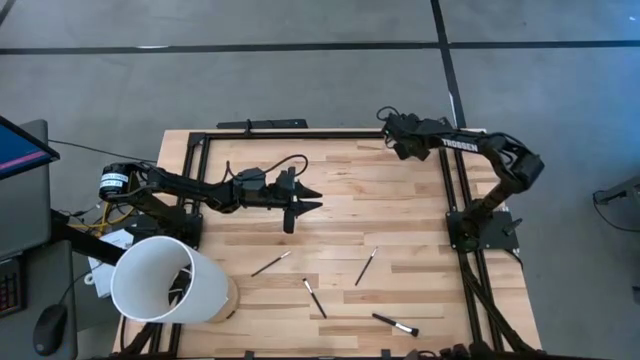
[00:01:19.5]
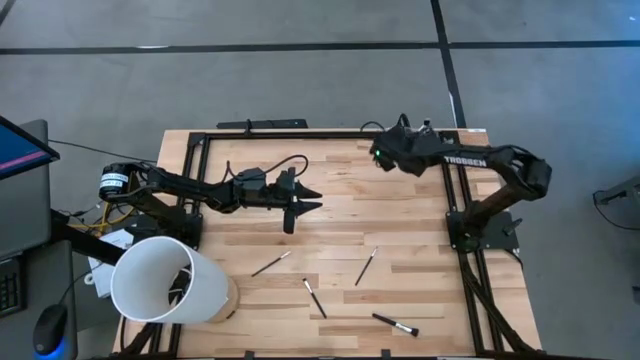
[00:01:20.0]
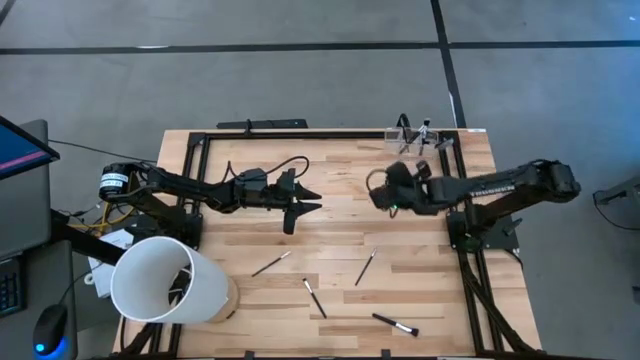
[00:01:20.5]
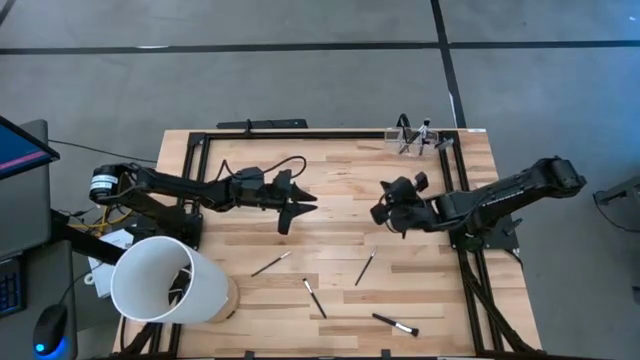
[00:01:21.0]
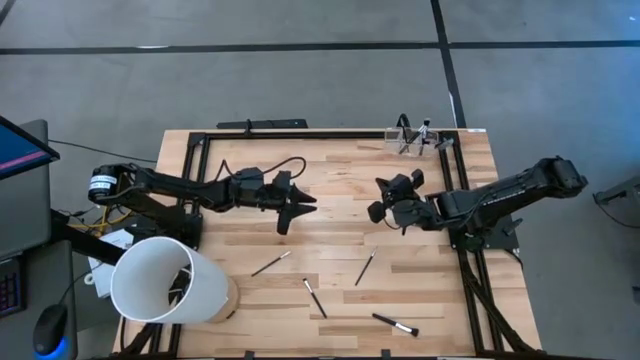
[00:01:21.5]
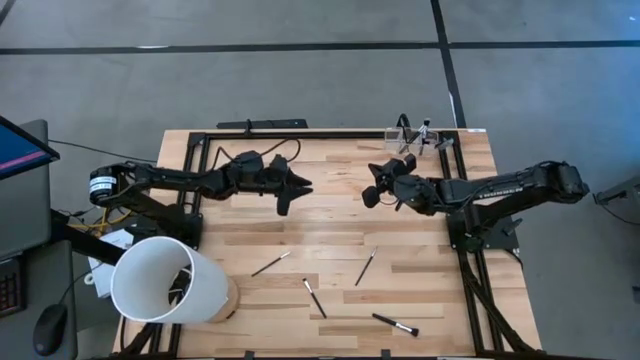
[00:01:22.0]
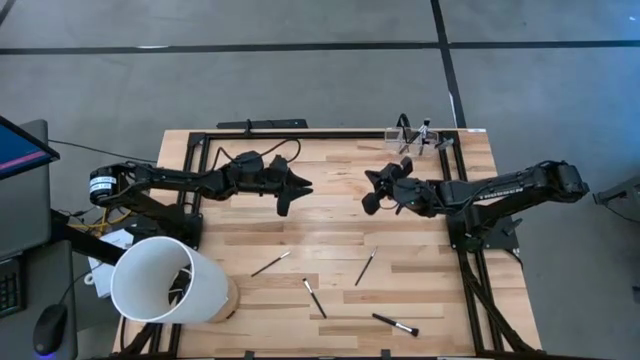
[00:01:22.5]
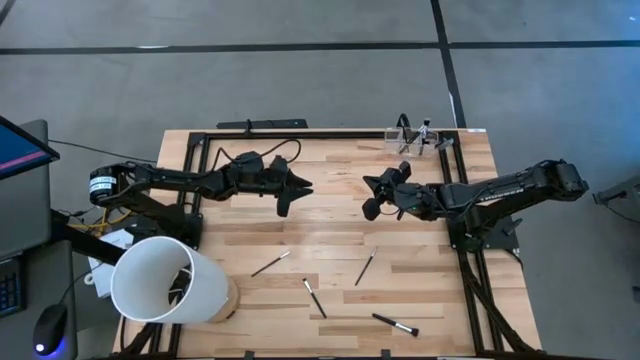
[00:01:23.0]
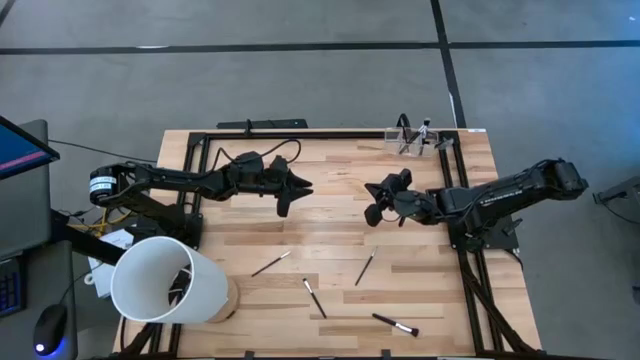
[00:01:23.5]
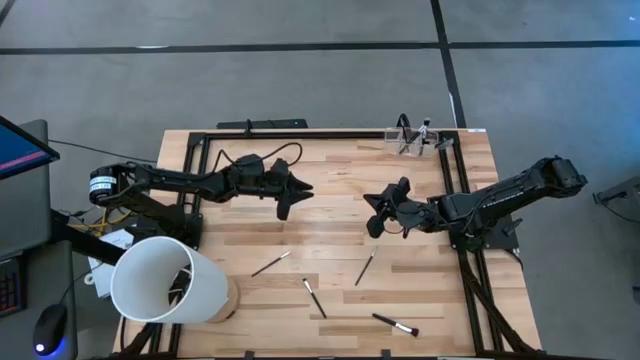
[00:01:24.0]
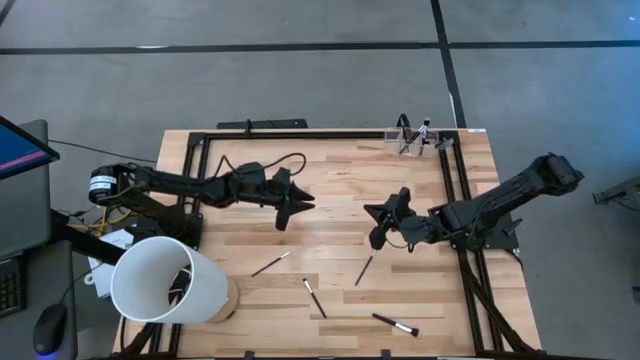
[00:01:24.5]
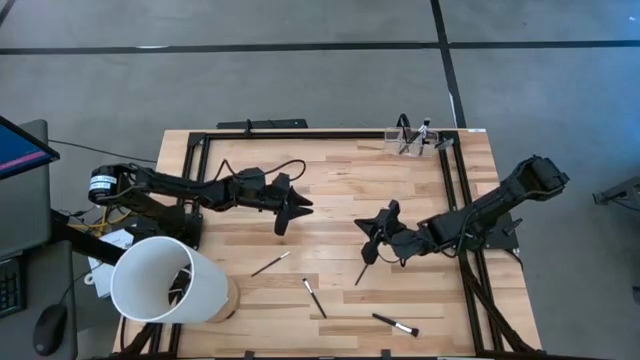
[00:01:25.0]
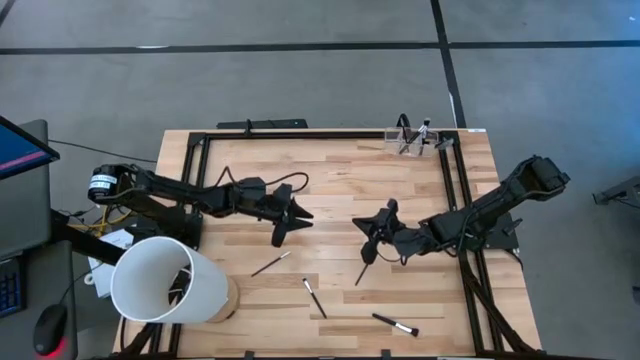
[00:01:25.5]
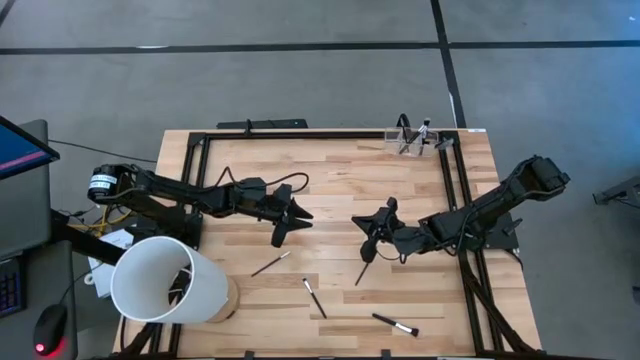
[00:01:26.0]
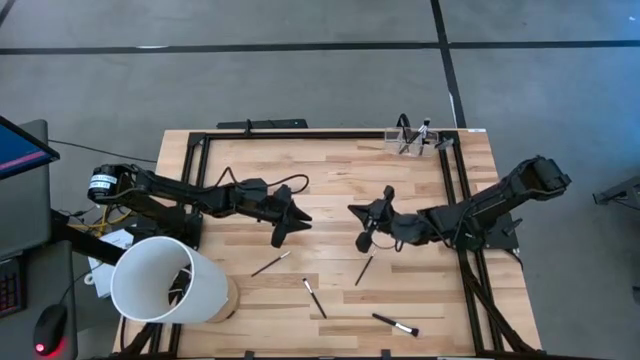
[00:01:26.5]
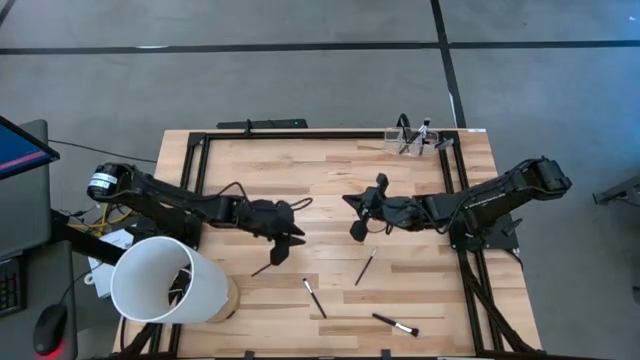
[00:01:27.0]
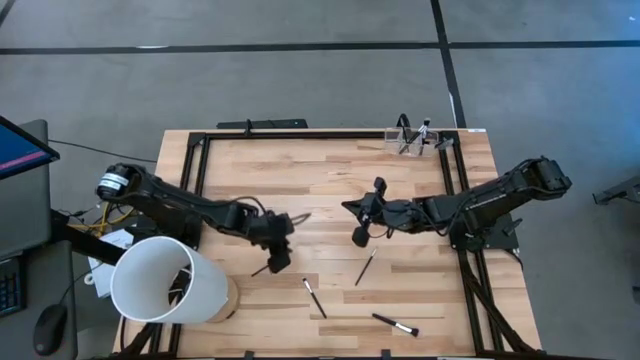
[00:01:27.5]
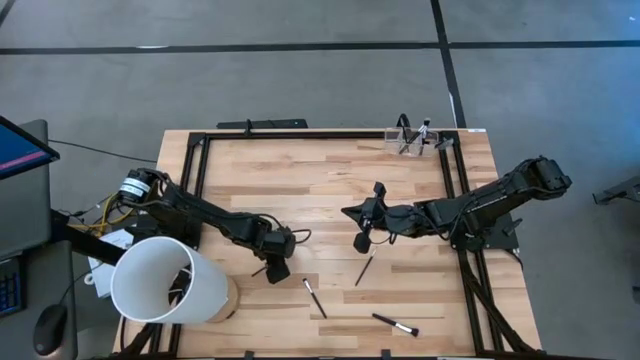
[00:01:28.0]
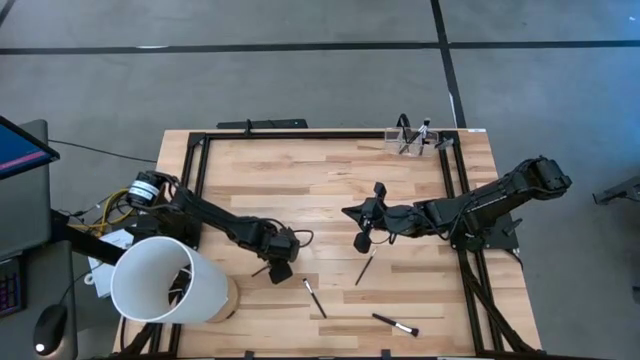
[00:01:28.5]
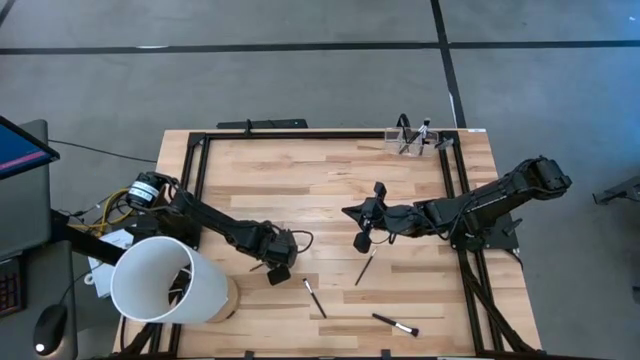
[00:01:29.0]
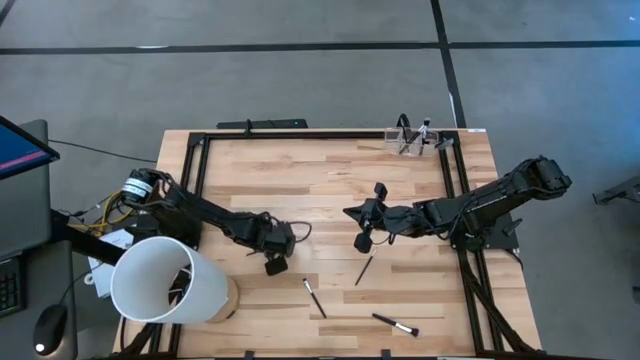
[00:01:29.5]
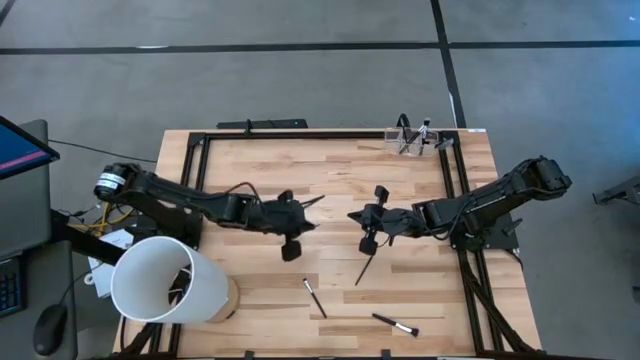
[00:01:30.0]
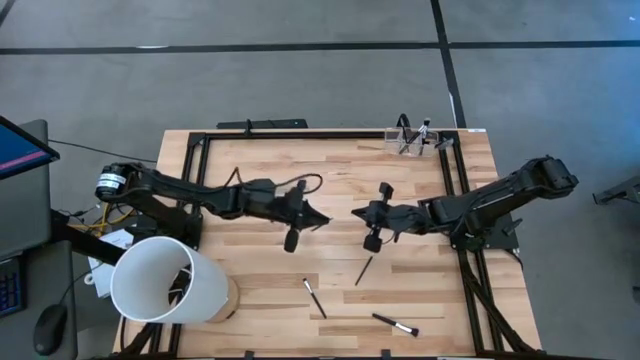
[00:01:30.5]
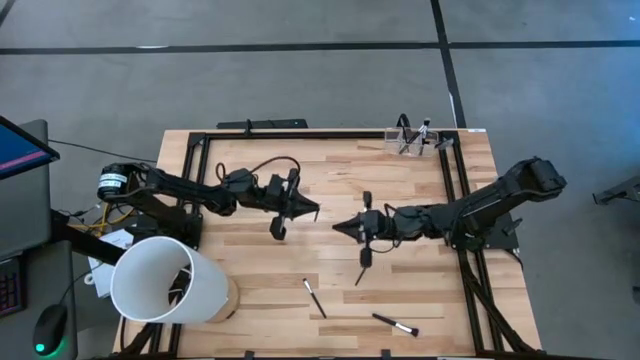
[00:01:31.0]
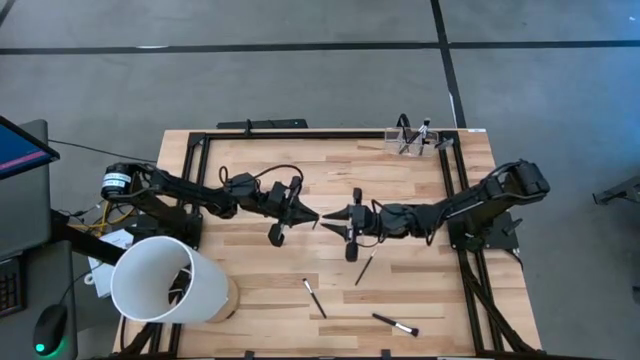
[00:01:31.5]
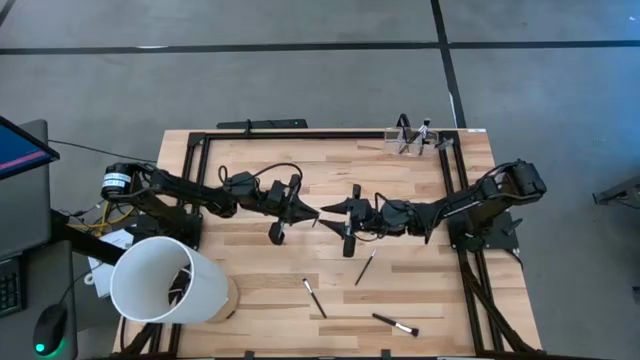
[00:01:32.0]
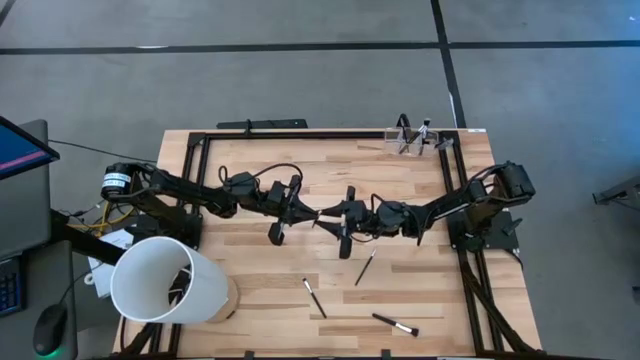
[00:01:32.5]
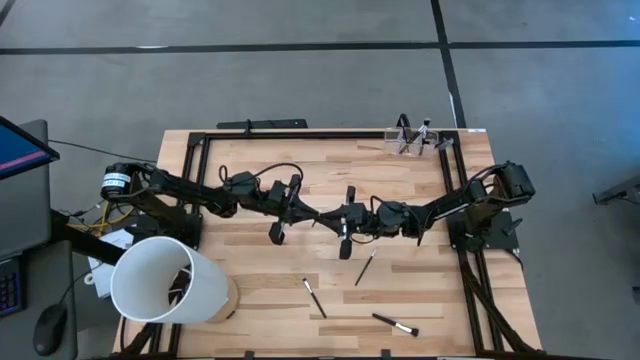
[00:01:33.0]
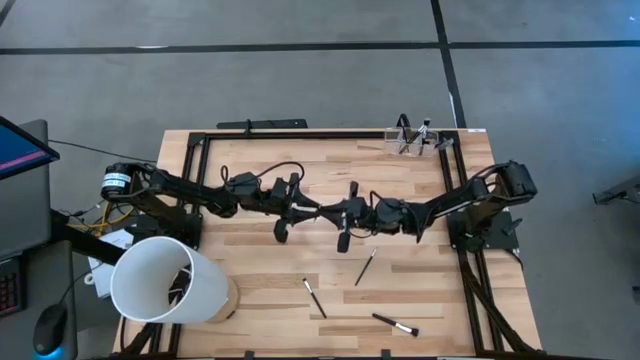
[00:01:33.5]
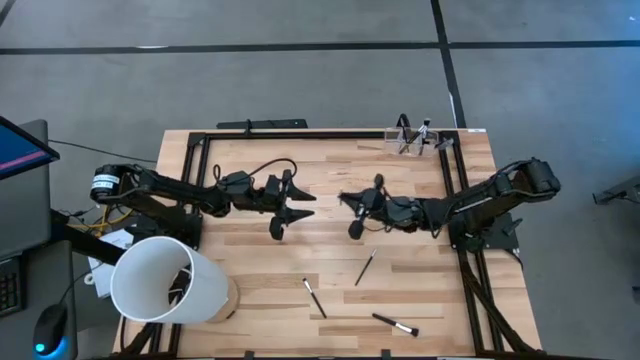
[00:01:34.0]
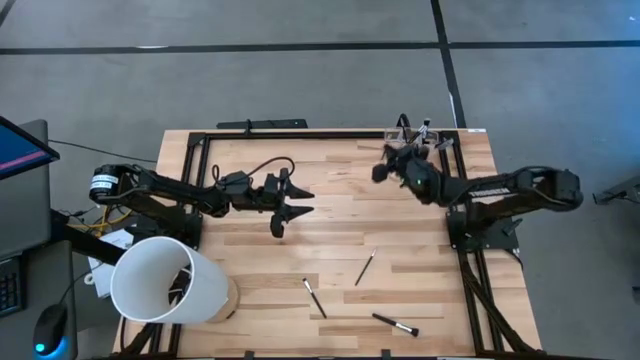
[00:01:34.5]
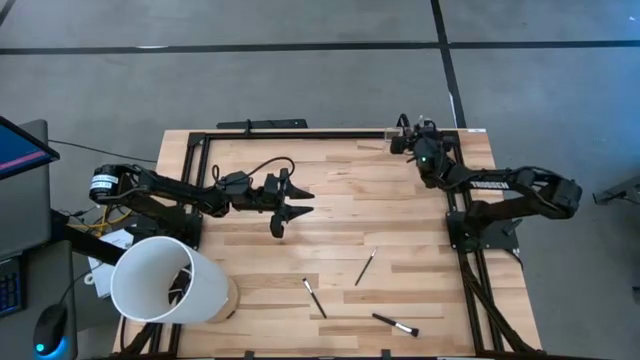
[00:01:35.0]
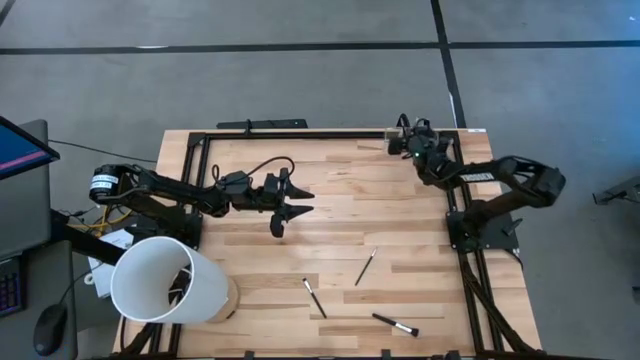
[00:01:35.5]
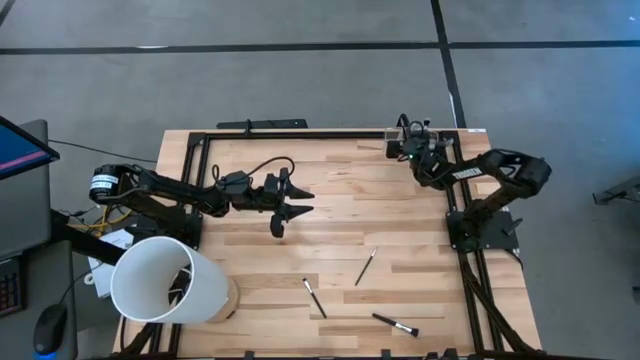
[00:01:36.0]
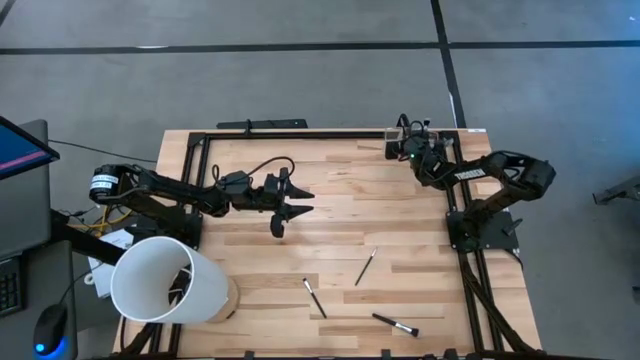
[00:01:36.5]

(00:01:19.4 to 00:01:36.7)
Task: Put items in baskets/containers
Put the black eyeshadow brush into the middle section of the transparent organizer
